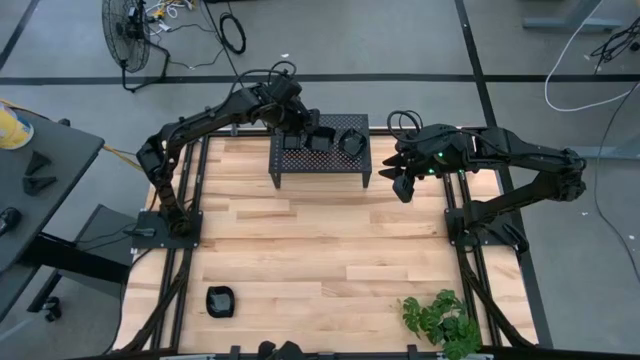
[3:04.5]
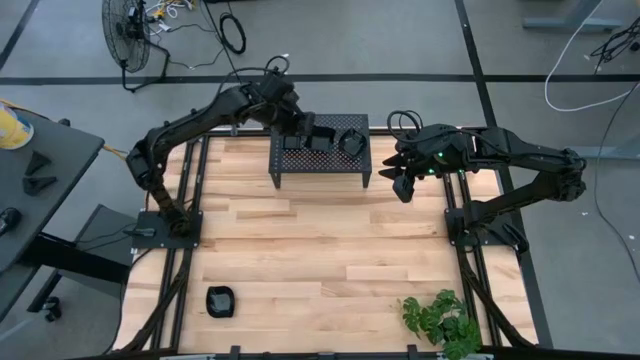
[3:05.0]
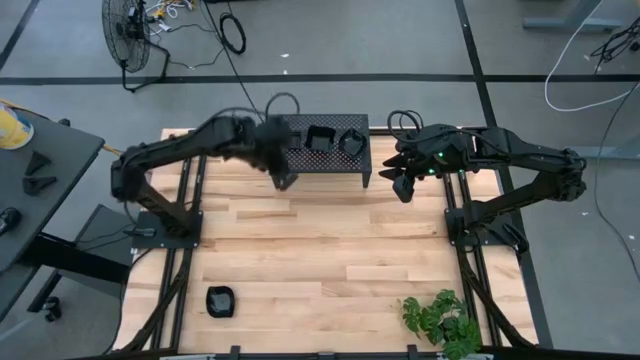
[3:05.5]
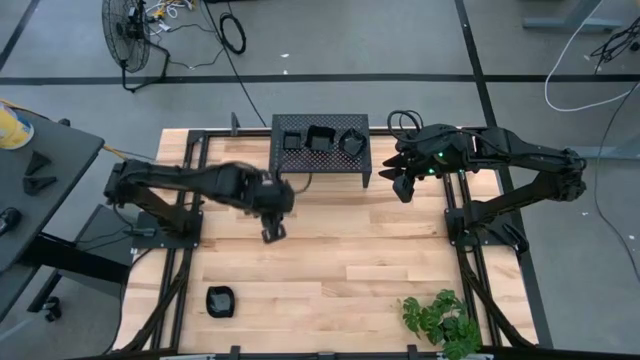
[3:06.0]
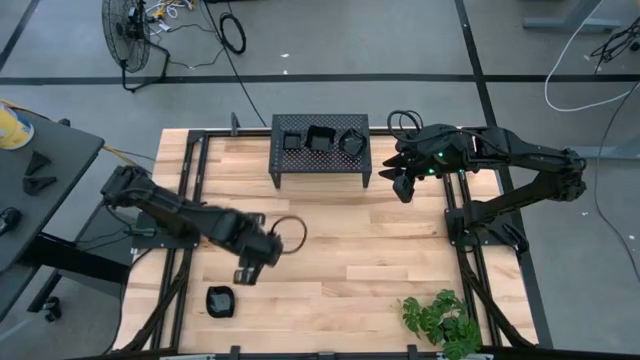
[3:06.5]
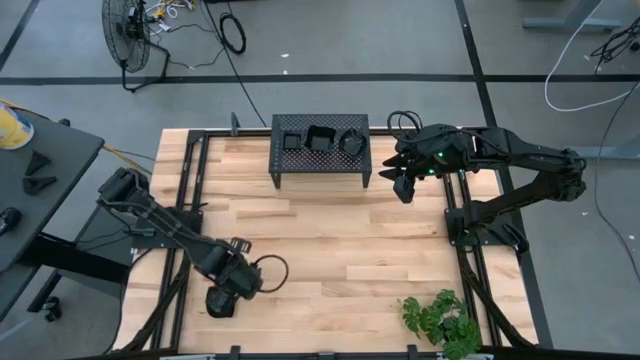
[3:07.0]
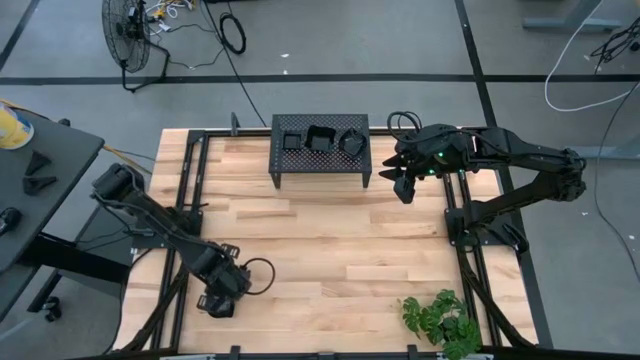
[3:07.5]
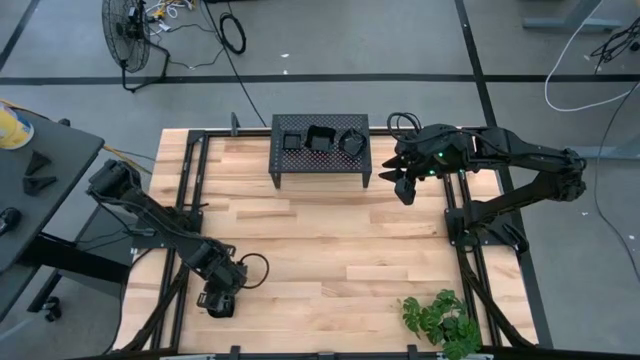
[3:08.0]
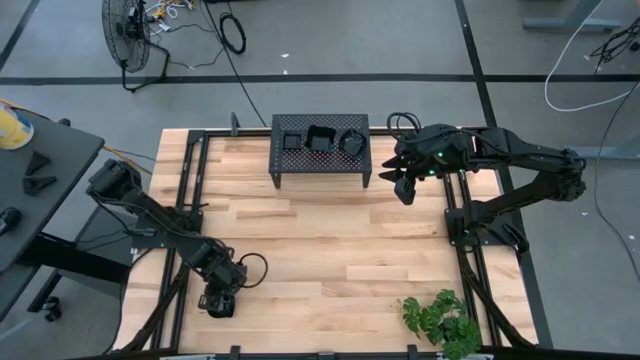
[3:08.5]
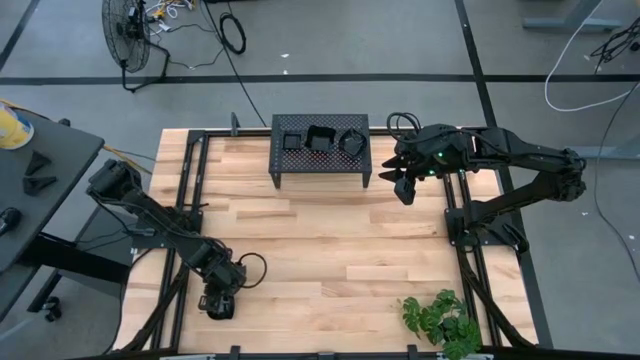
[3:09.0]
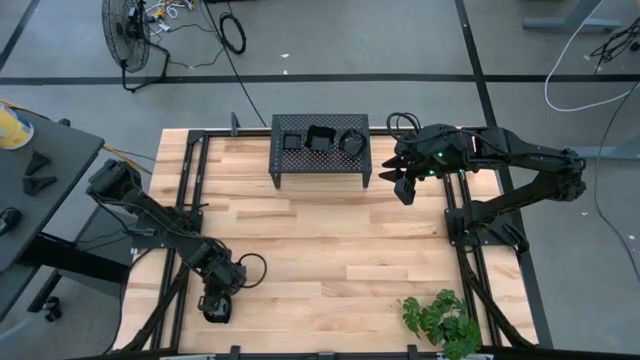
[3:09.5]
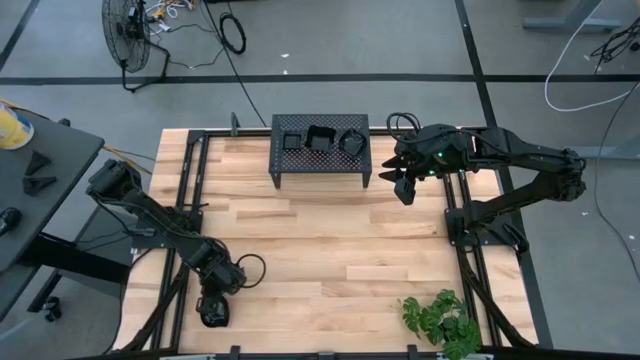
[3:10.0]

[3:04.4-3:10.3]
Task: Pick & Place Mini shaped plates
Stack the leaf shaped plate on top of the other leaf shaped plate on the shelf

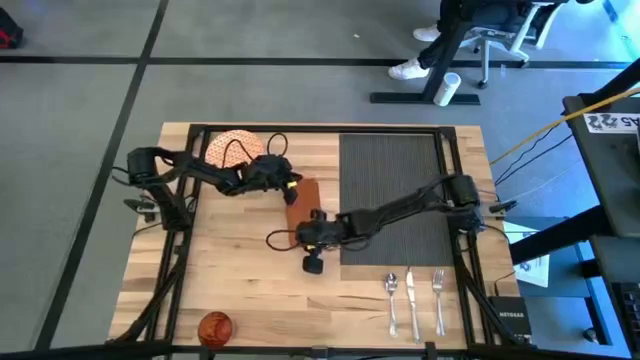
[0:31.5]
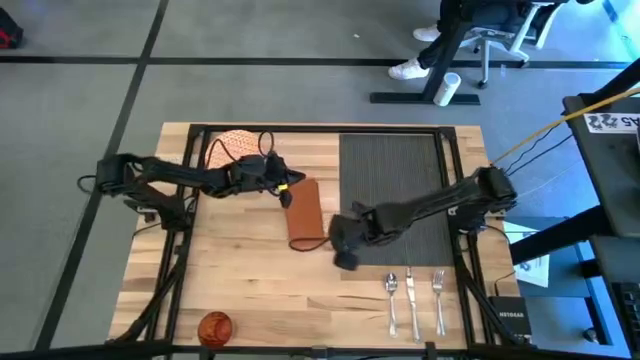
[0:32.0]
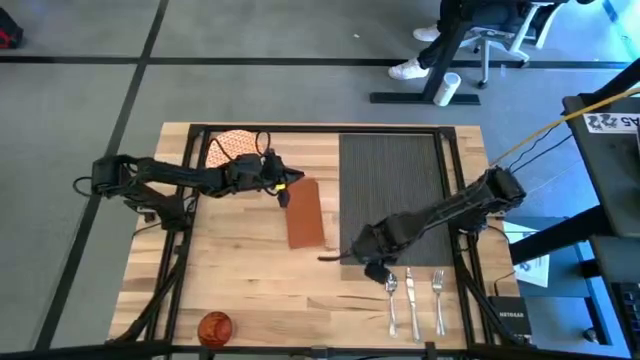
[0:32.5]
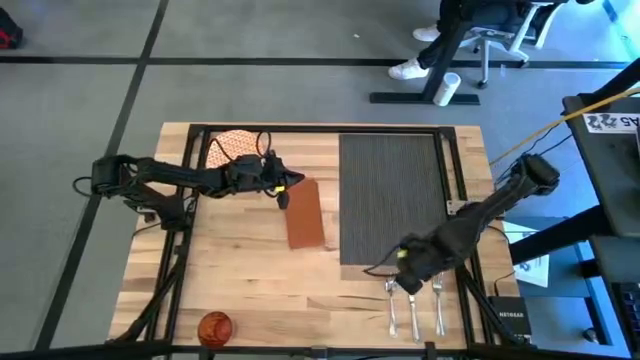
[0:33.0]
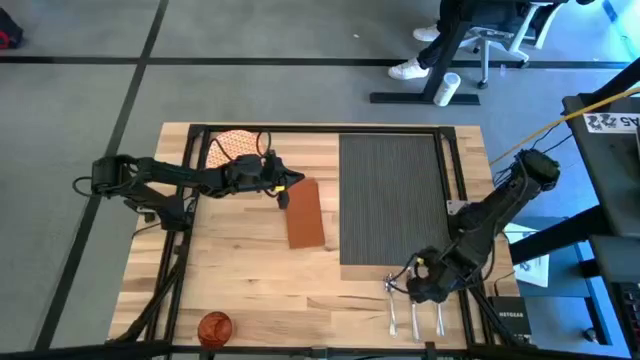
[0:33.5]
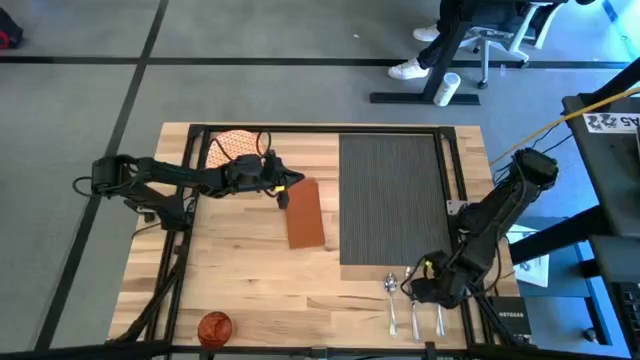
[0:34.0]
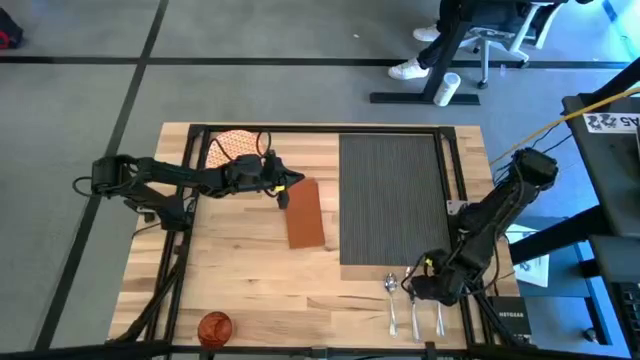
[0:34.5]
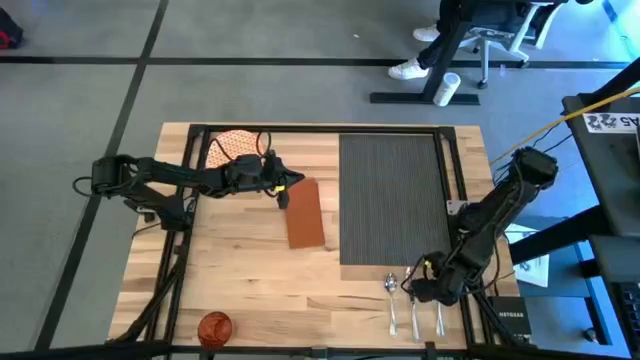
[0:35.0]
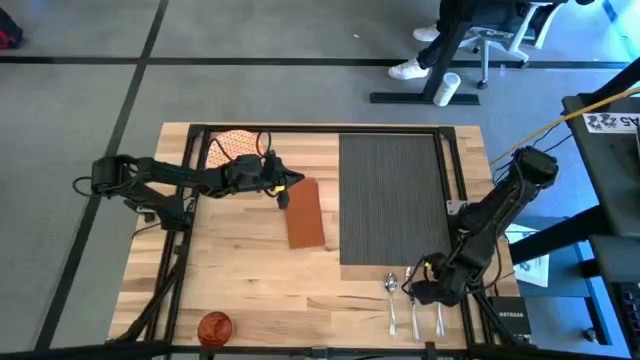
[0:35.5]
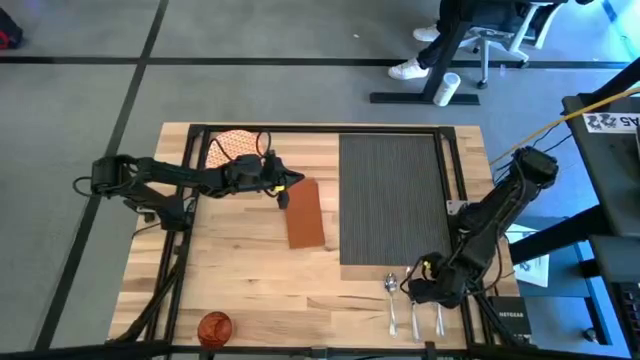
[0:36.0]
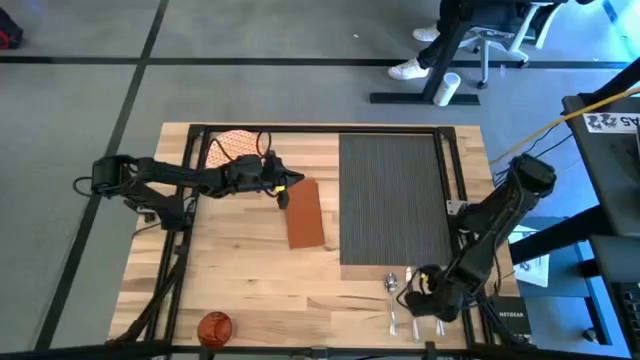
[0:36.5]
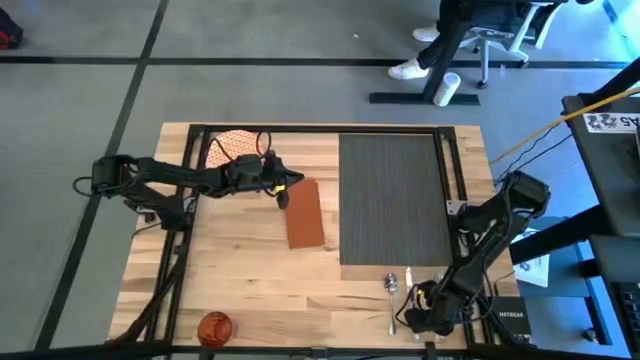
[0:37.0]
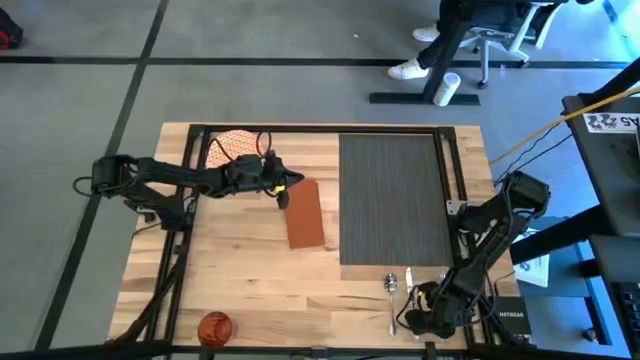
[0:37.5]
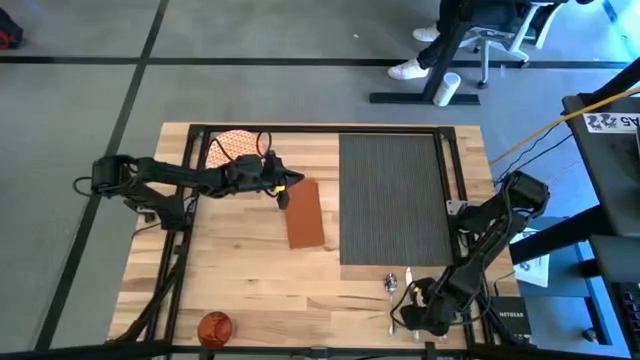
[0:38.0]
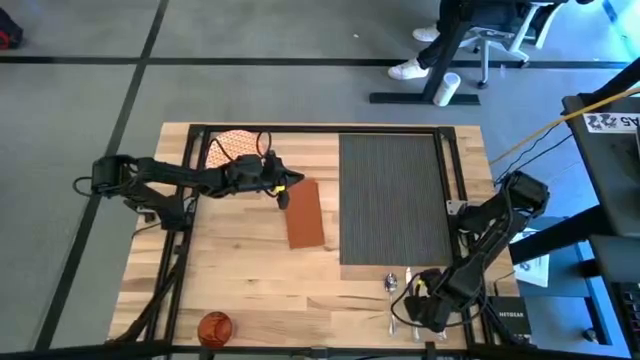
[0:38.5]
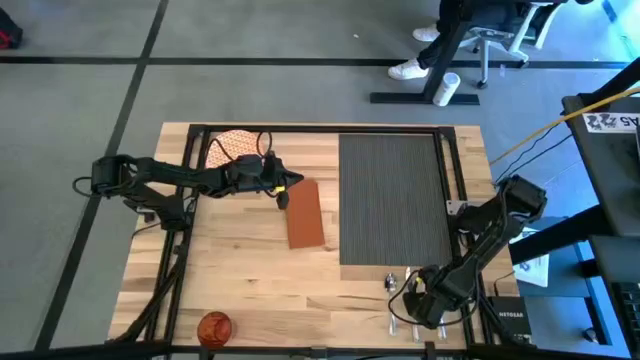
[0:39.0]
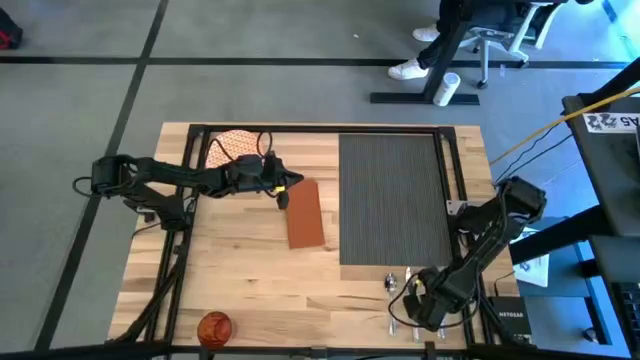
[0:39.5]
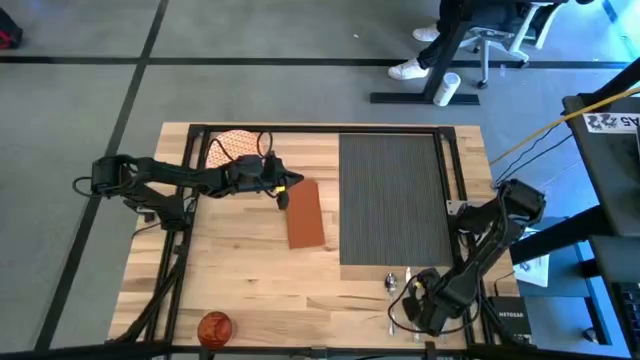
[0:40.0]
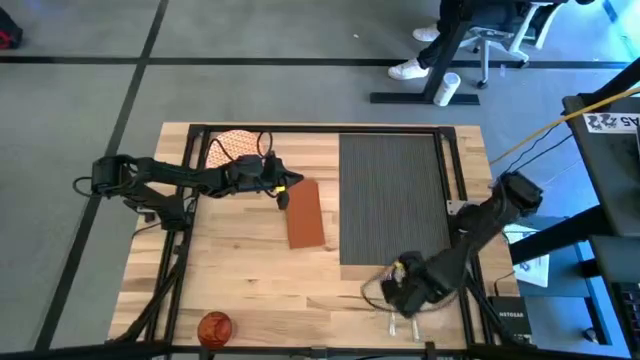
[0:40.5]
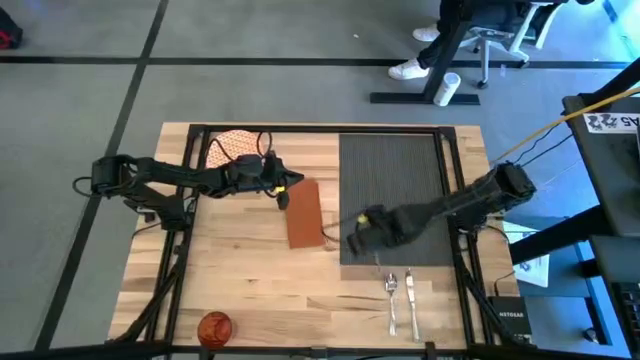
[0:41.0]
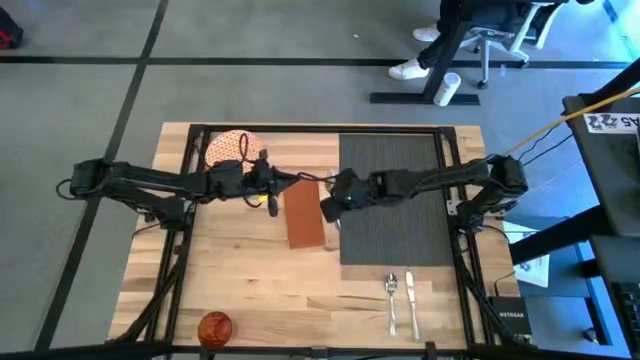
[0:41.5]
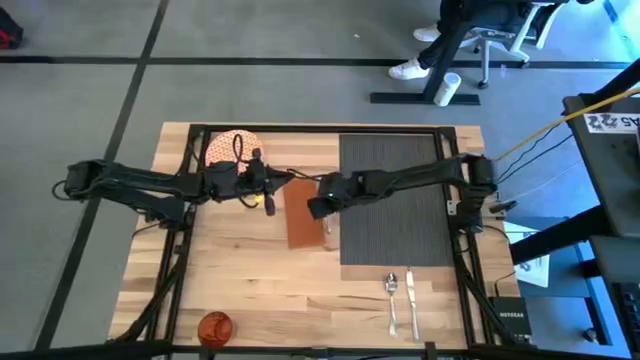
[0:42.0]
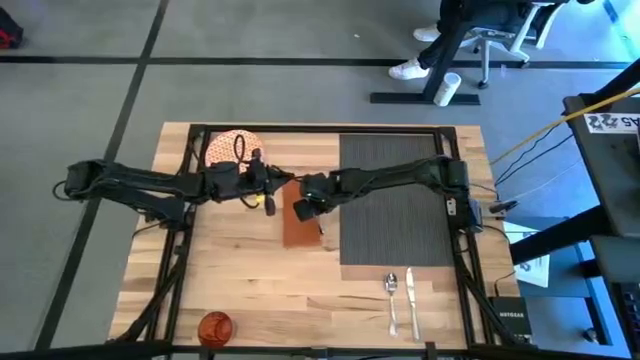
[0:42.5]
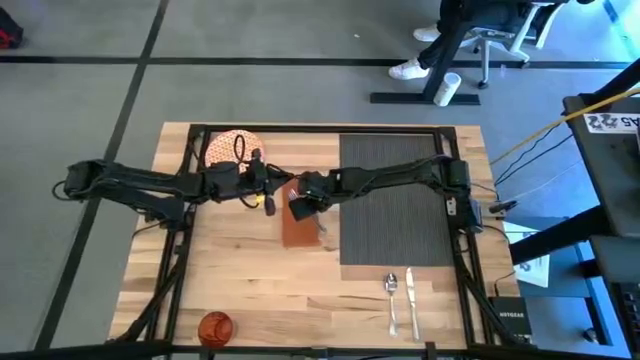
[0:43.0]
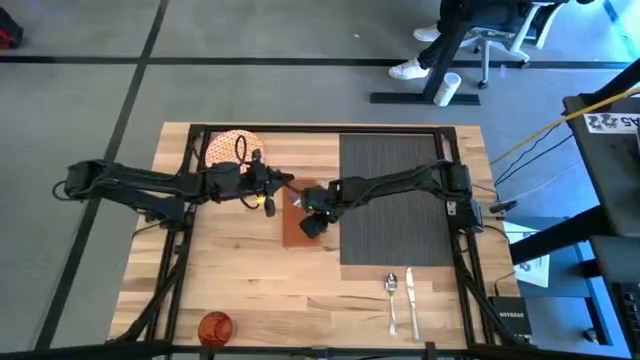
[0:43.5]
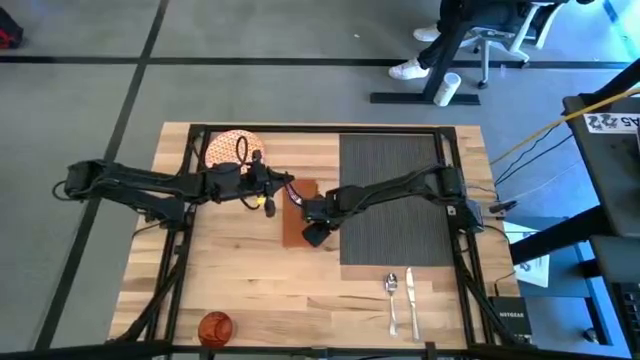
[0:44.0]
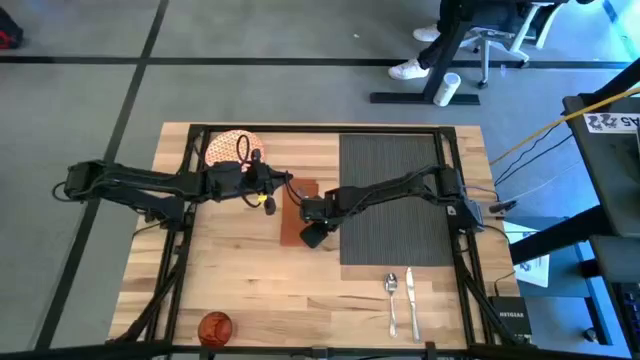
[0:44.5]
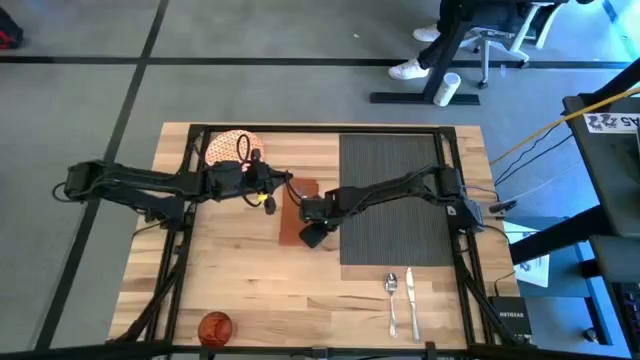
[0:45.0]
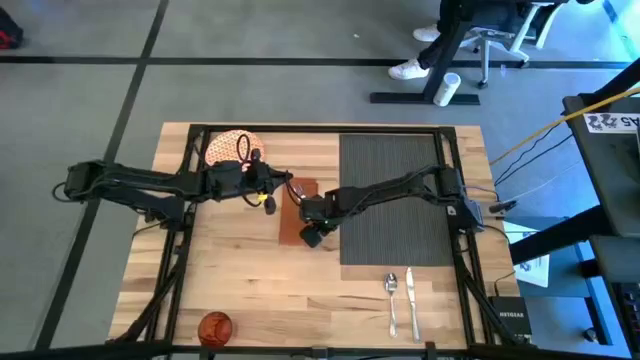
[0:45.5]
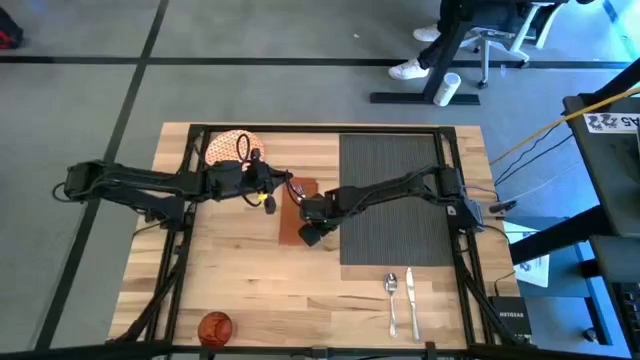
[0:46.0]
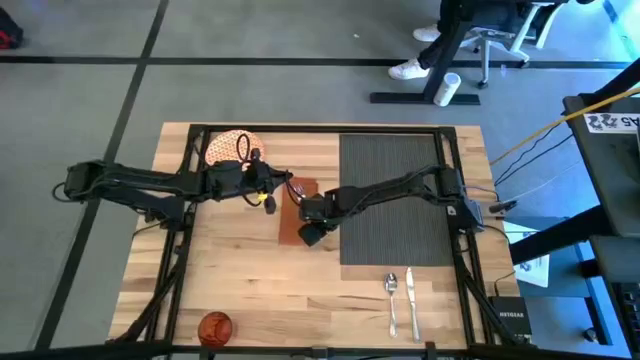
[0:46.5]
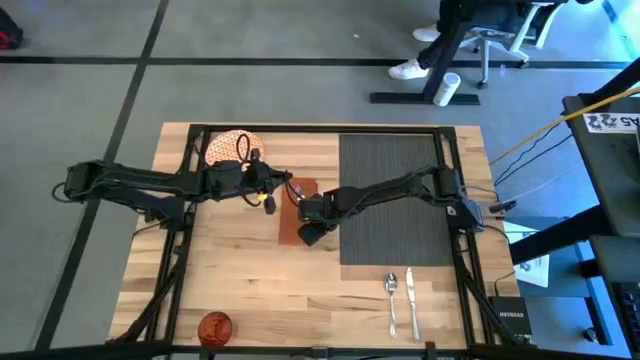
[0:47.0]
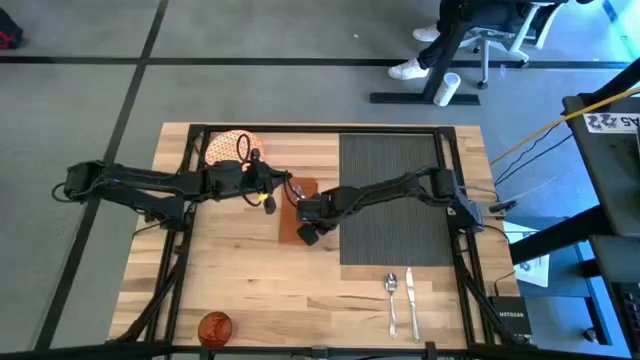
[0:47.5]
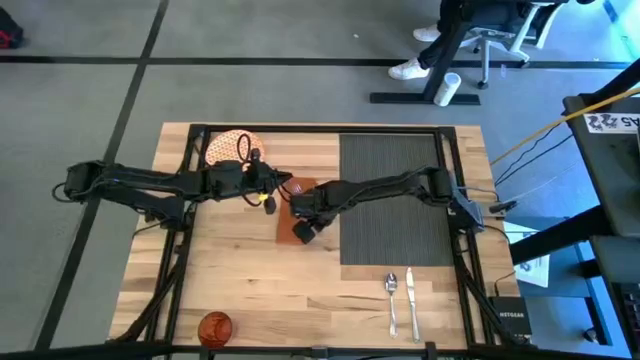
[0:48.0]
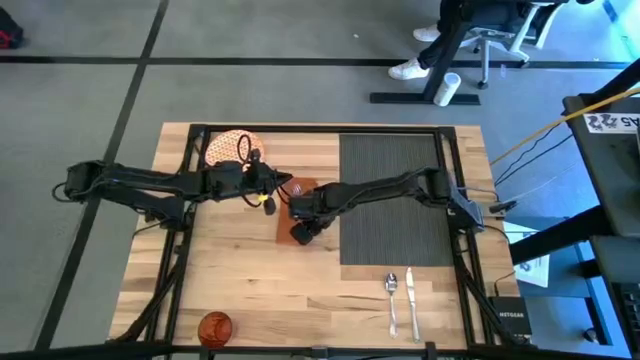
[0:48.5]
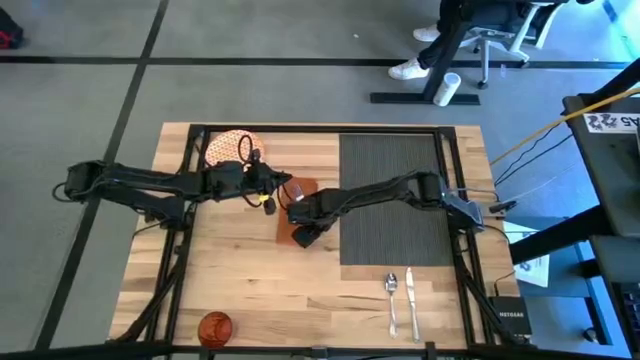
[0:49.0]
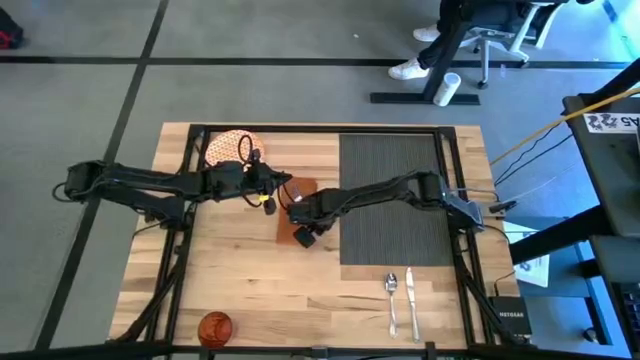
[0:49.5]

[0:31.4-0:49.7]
Task: Set table place
Put the silver fork on top of the orange table napkin
